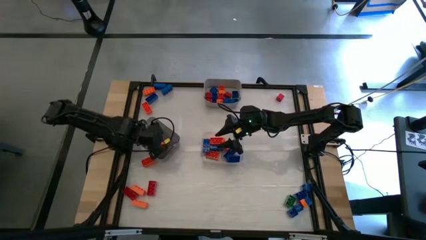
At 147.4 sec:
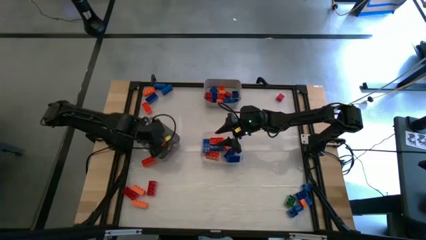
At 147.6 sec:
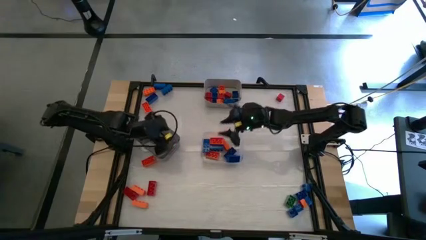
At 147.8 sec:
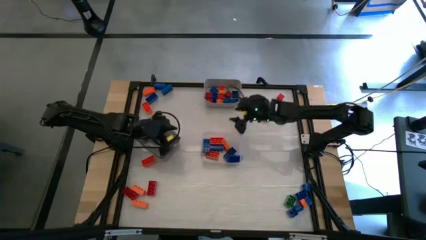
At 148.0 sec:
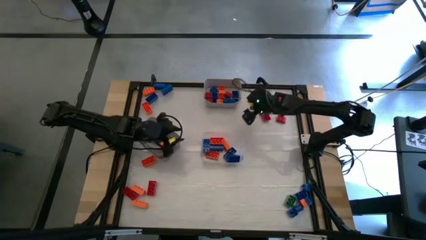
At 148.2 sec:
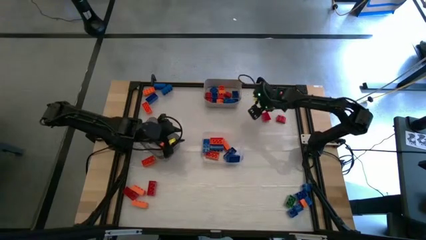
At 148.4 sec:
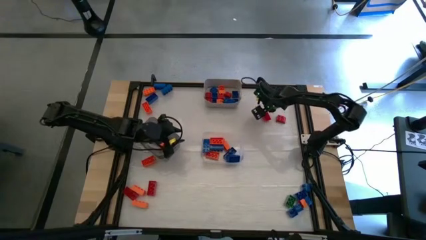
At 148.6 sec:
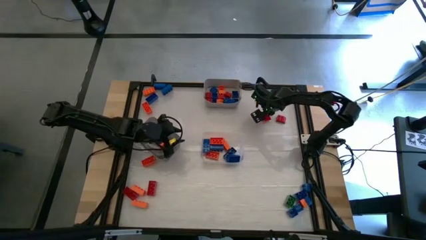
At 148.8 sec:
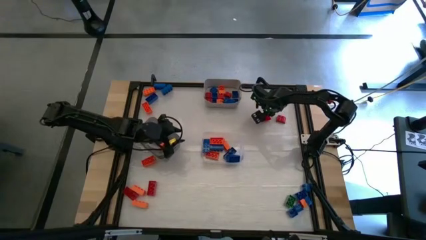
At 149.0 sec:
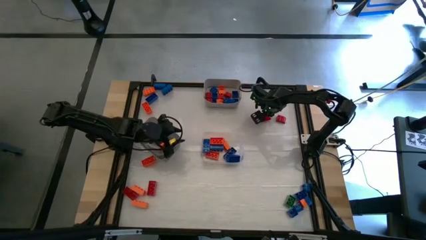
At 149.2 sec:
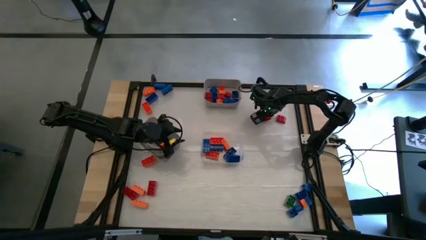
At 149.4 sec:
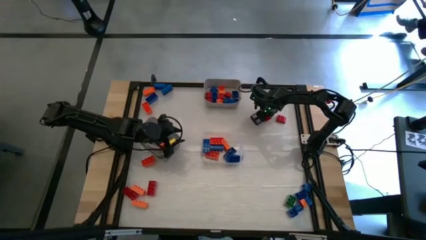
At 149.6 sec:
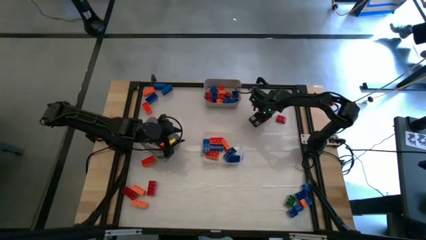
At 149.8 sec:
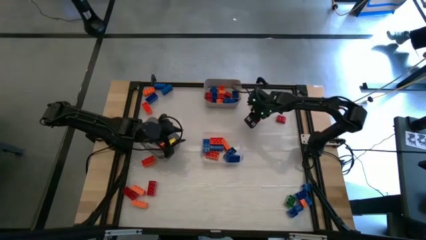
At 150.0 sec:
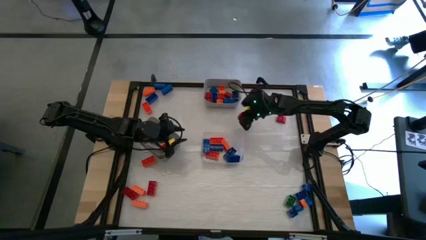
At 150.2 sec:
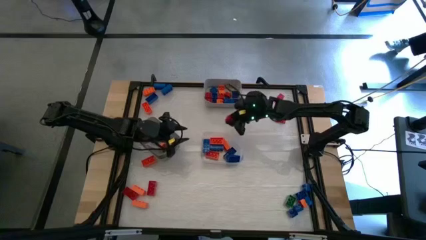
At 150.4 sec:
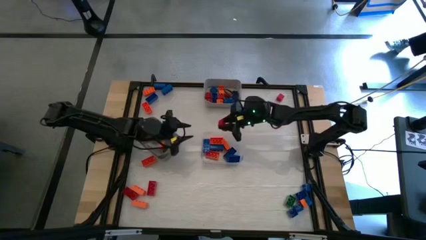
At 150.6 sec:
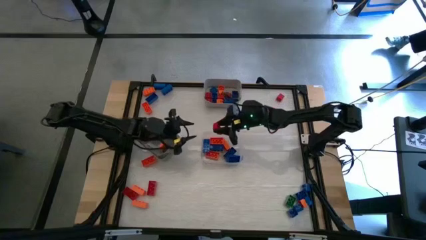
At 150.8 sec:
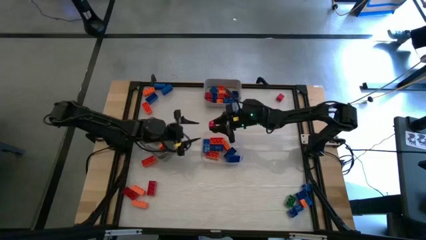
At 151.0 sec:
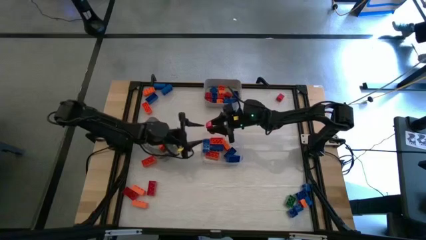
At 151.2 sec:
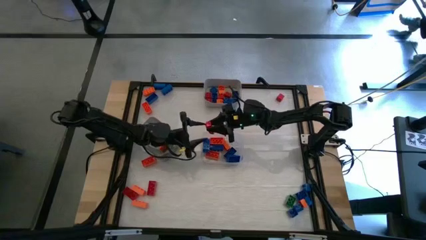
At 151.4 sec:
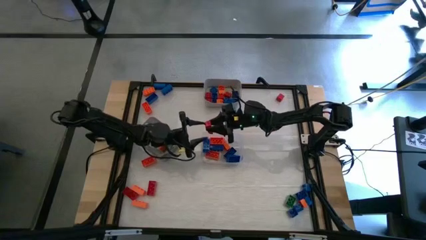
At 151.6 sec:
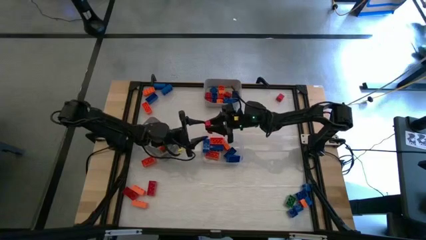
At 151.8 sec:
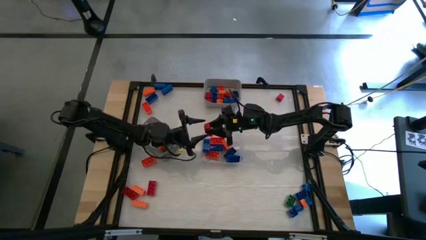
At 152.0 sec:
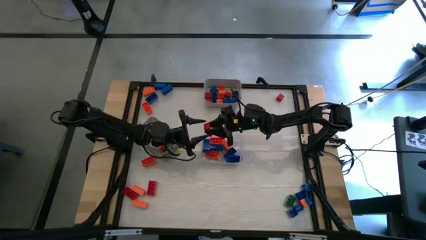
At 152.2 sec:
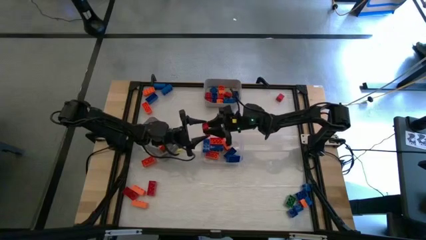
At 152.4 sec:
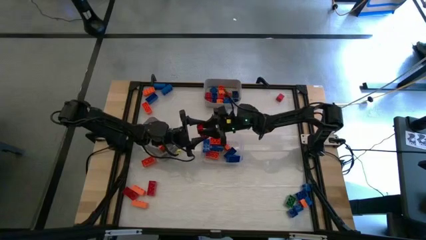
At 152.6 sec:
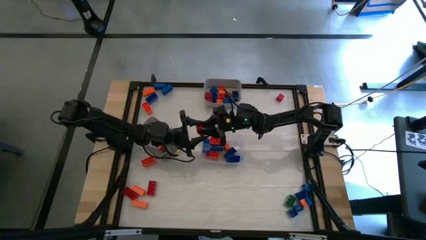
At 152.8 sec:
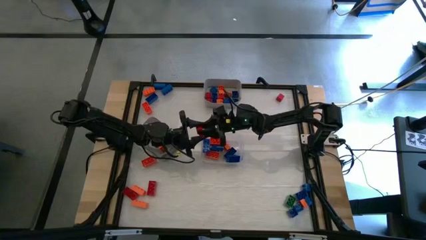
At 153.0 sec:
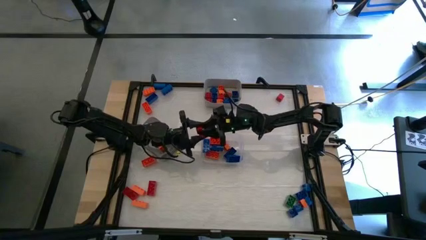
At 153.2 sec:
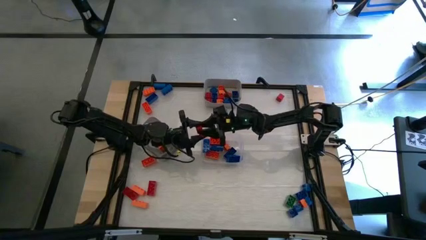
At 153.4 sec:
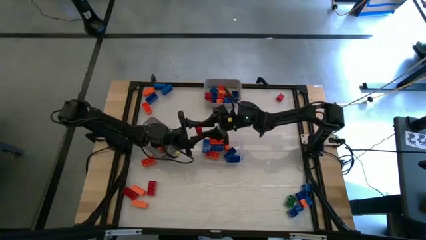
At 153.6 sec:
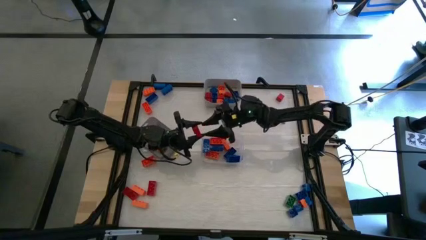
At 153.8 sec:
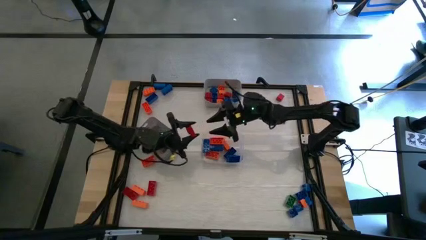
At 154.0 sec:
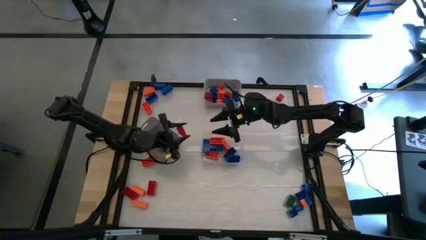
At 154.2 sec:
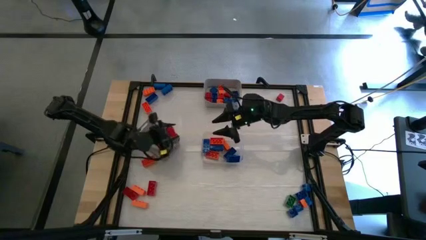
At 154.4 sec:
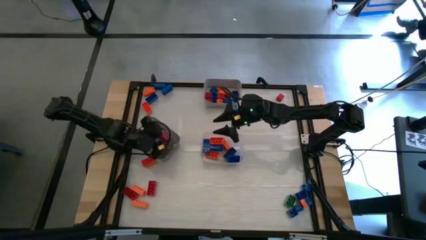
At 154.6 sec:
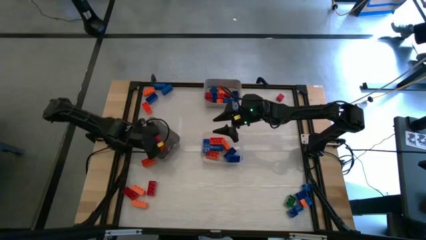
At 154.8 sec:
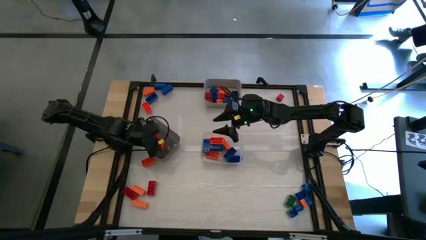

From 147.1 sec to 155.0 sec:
Task: Sort blocks by size
Put the red curved game piece into the black bin

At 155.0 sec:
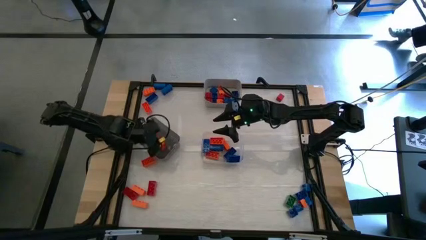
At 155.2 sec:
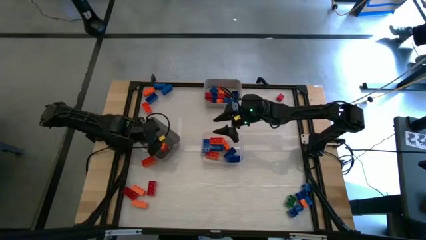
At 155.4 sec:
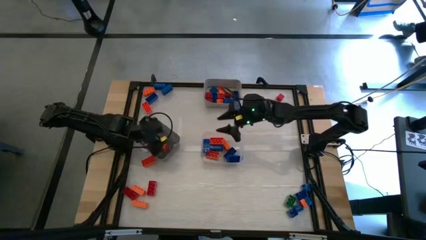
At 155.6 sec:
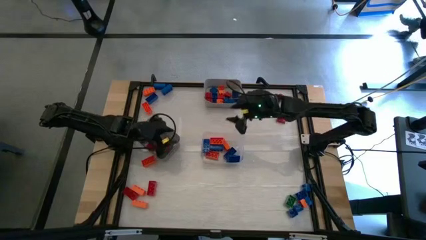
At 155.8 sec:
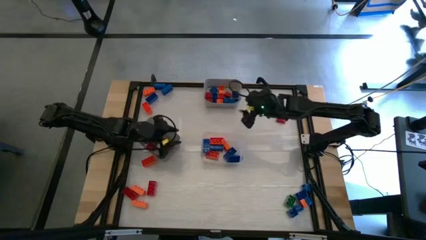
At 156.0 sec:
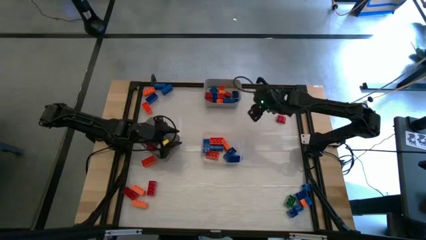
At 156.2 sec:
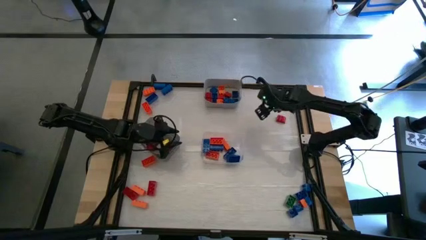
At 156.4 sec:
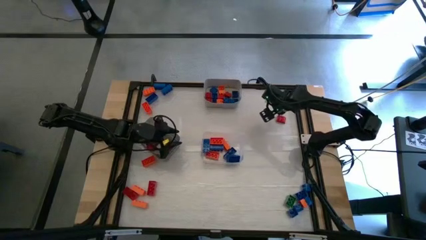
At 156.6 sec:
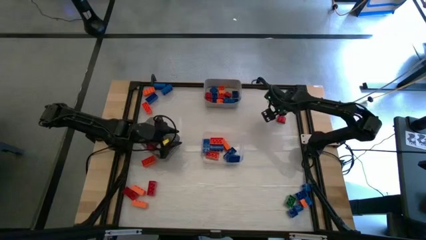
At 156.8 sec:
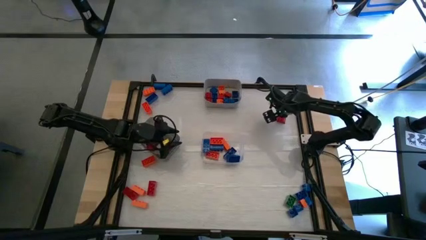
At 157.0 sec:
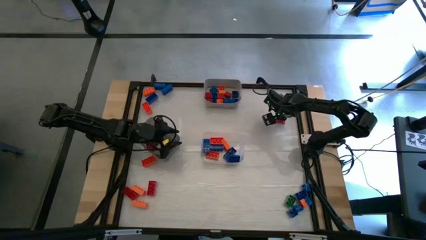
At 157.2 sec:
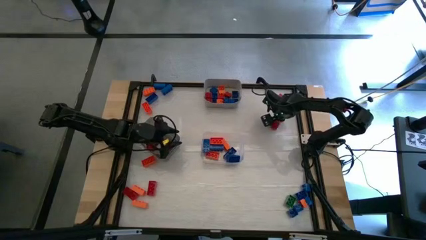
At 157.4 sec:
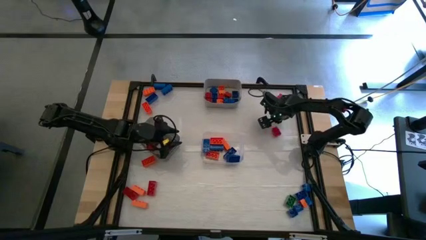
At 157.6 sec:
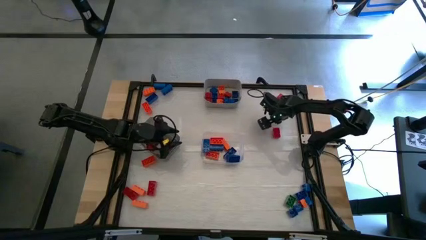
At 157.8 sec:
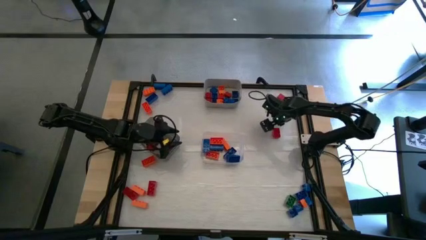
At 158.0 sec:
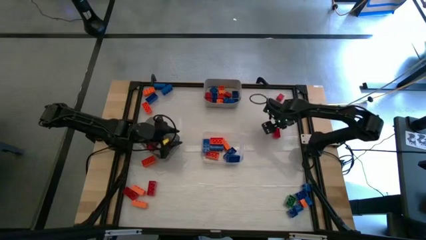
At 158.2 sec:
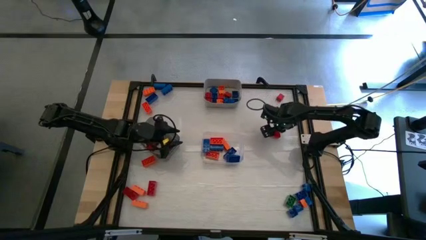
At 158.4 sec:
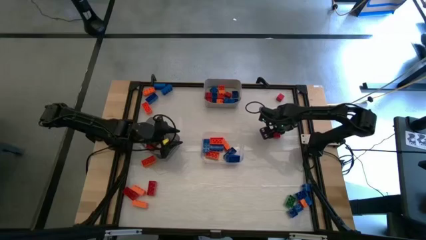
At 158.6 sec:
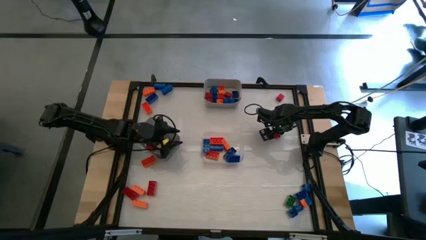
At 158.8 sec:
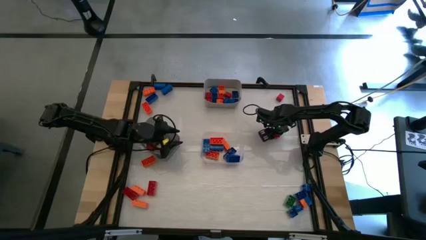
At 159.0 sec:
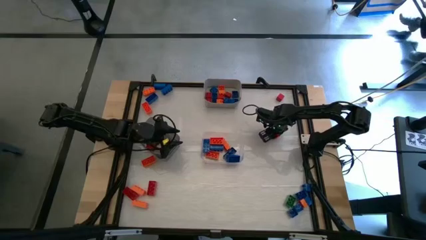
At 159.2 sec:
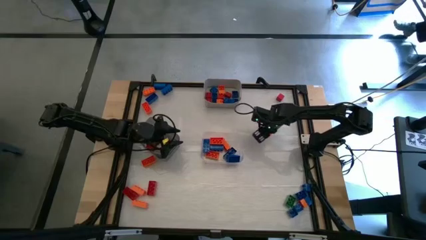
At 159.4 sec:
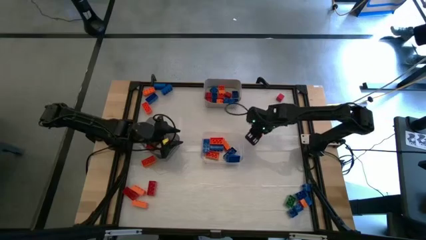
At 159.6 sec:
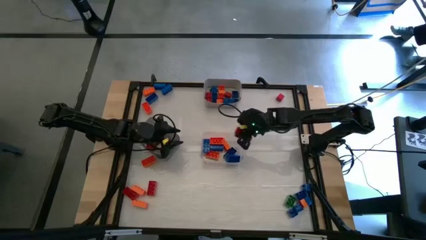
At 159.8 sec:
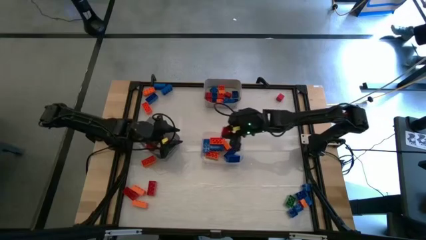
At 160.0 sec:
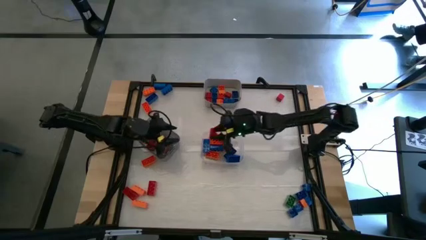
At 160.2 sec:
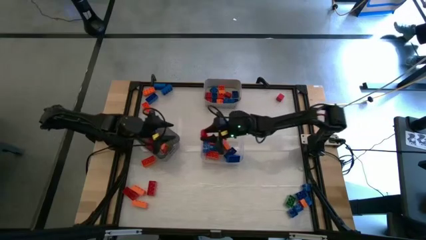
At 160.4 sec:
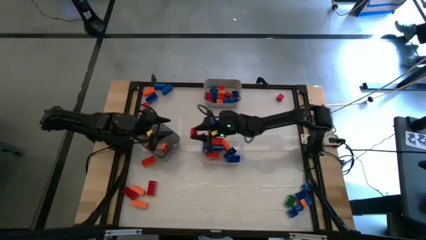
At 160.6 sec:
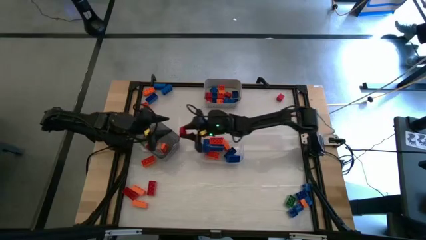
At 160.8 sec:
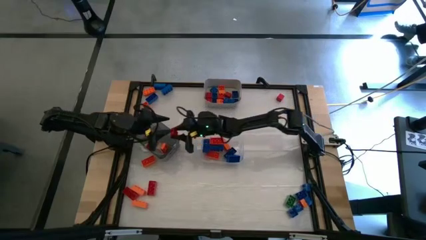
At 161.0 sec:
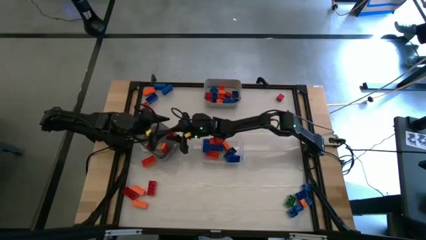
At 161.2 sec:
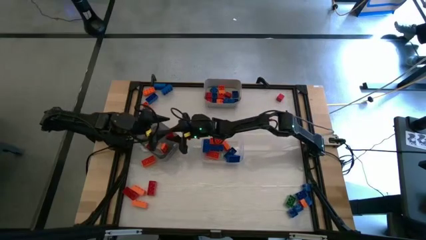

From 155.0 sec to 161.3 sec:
Put the red curved game piece into the black bin
